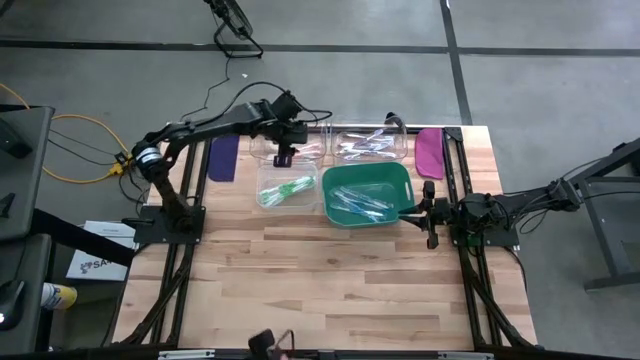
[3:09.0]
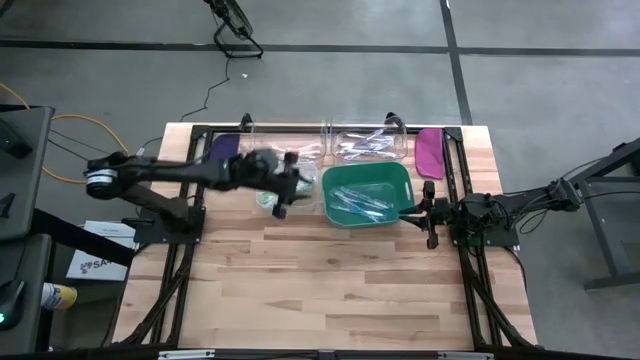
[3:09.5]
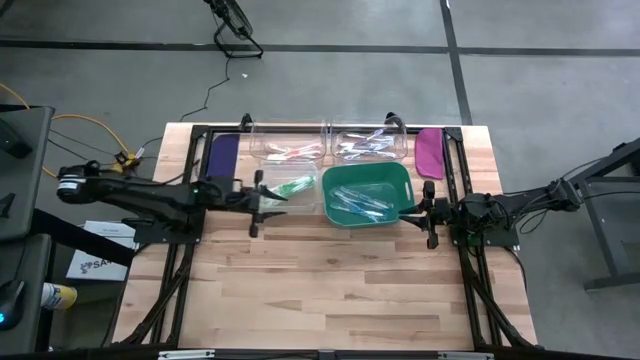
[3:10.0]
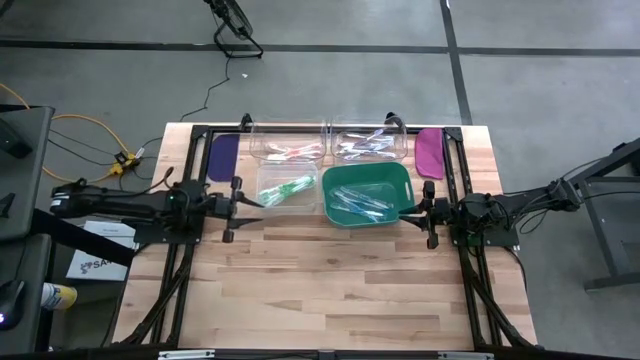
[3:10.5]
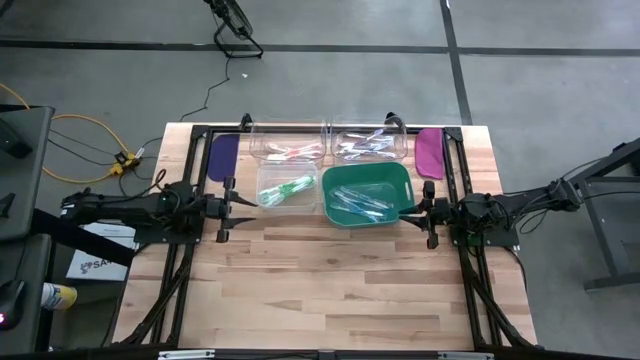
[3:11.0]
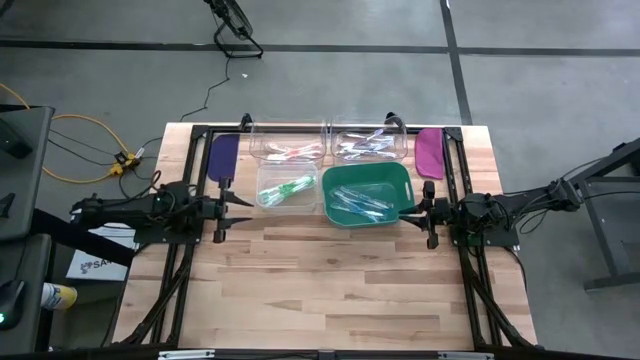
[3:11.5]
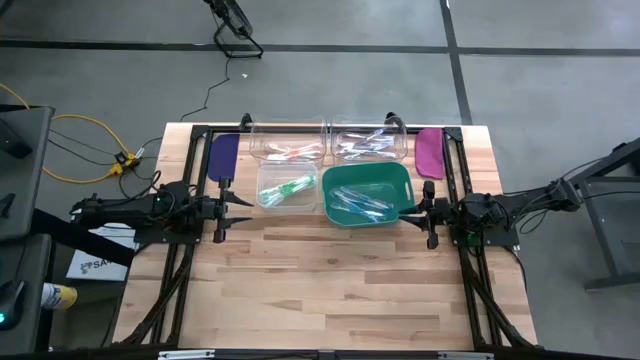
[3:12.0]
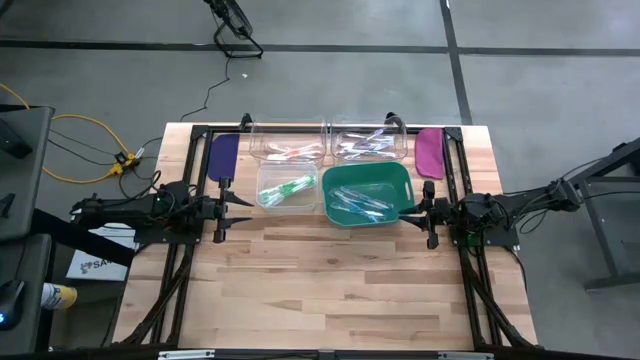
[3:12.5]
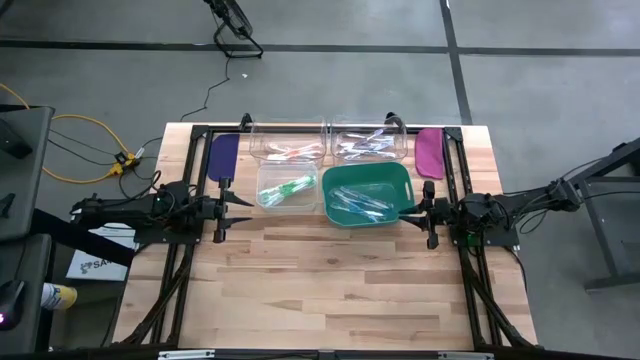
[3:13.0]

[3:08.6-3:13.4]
Task: Pick & Place Toothbrushes
Return to Home Position

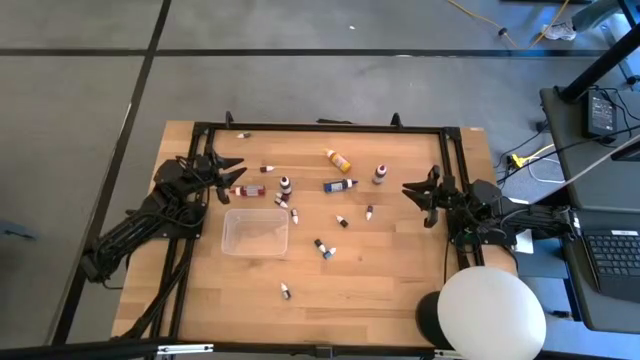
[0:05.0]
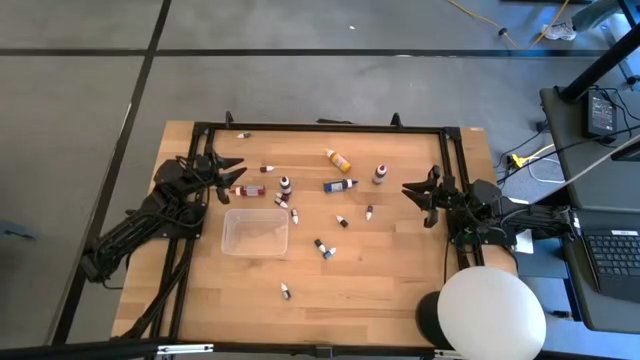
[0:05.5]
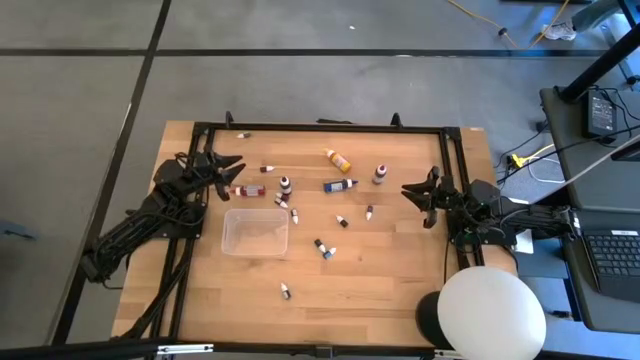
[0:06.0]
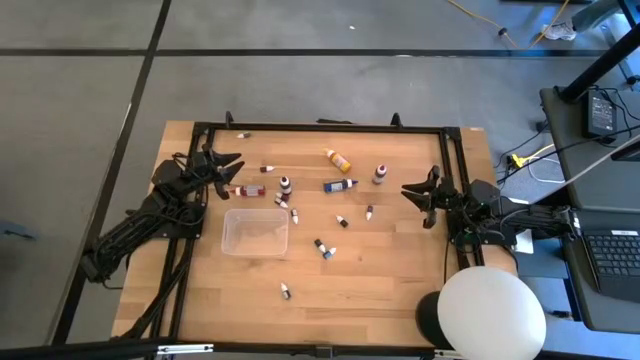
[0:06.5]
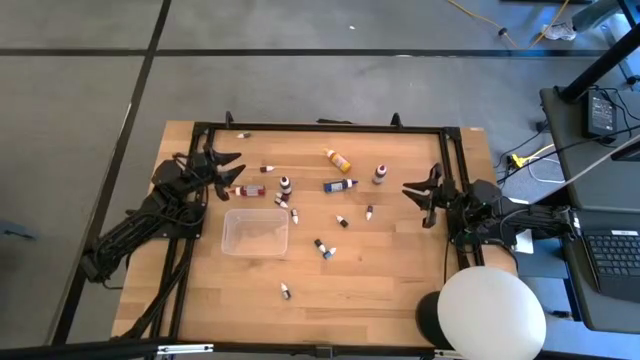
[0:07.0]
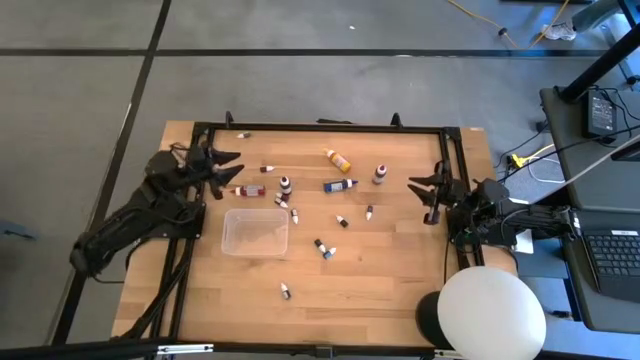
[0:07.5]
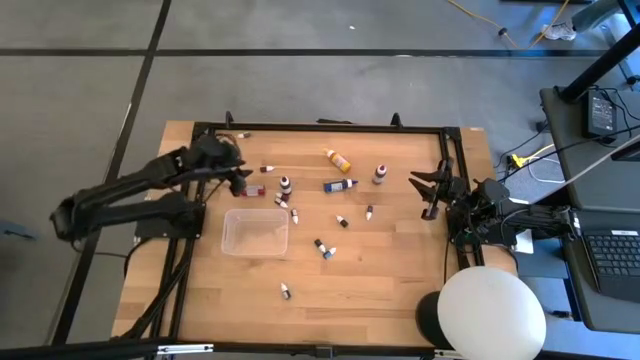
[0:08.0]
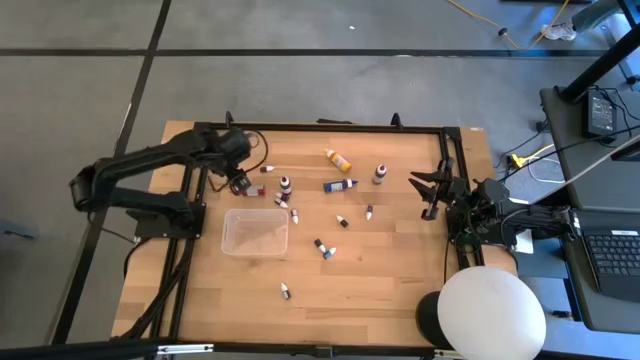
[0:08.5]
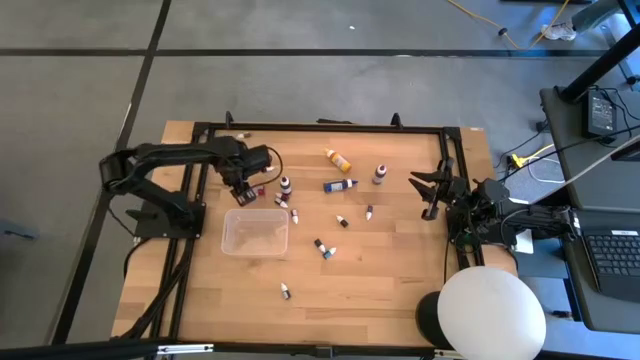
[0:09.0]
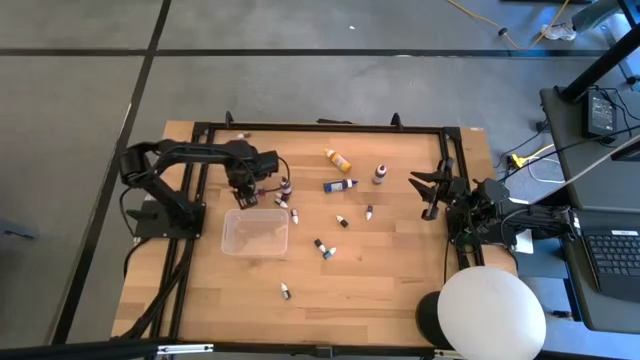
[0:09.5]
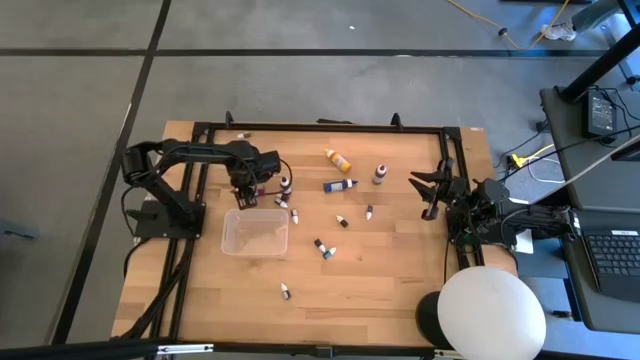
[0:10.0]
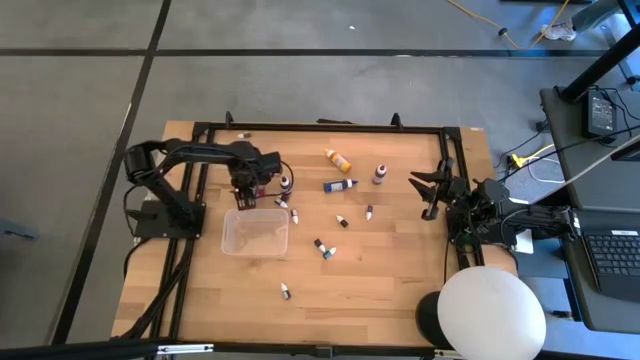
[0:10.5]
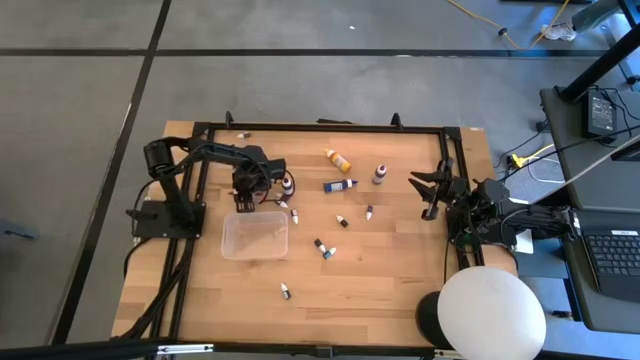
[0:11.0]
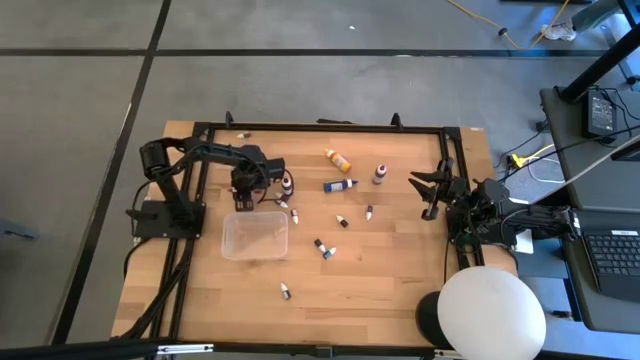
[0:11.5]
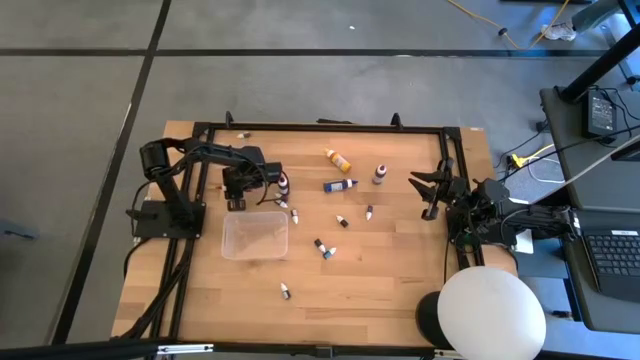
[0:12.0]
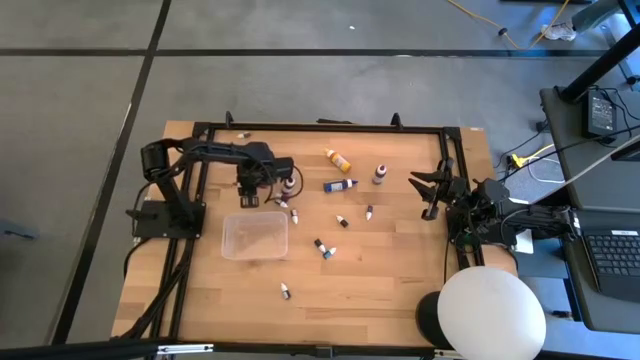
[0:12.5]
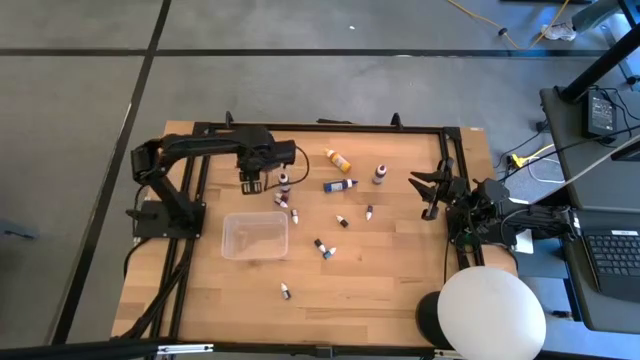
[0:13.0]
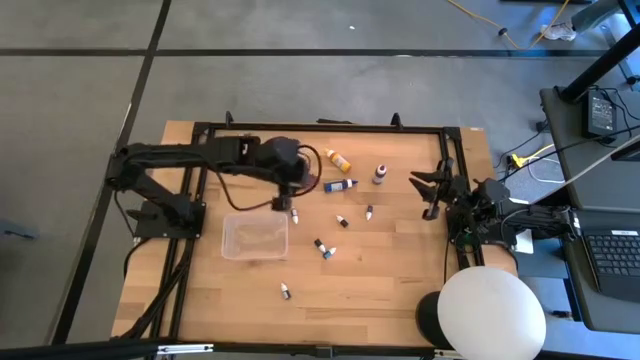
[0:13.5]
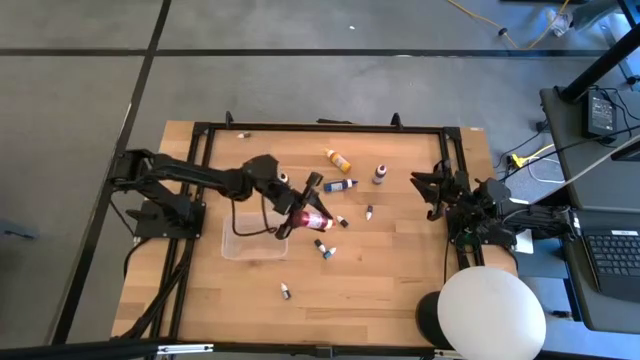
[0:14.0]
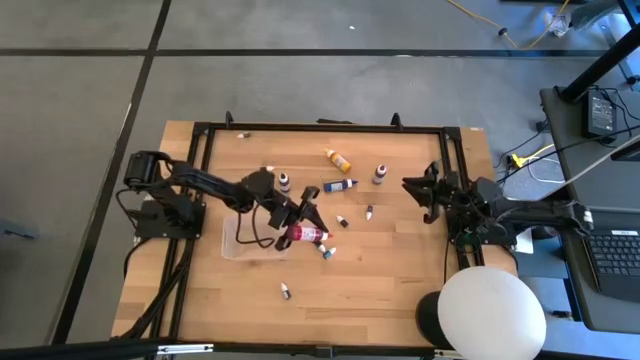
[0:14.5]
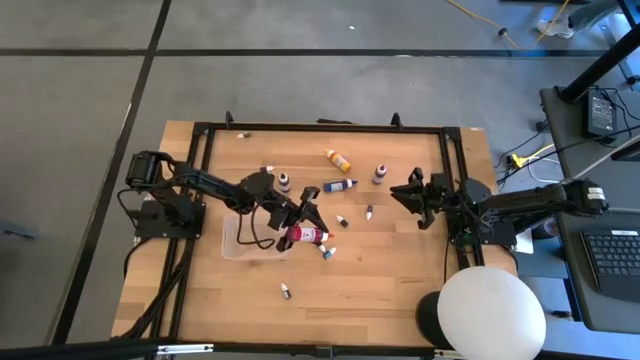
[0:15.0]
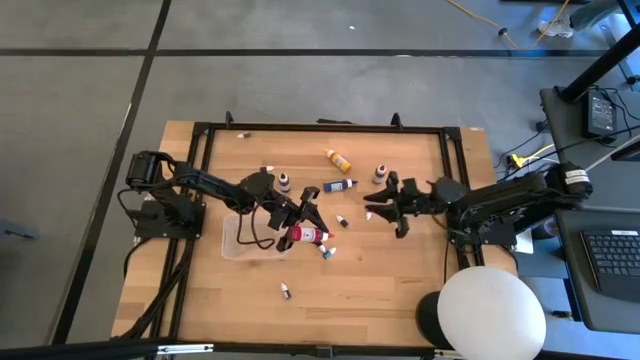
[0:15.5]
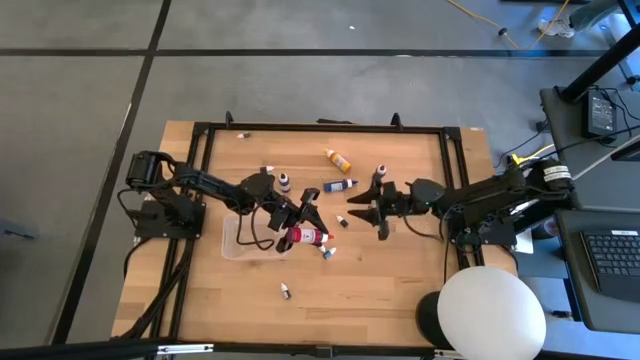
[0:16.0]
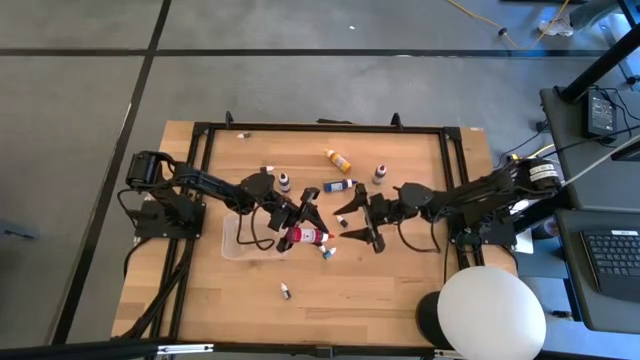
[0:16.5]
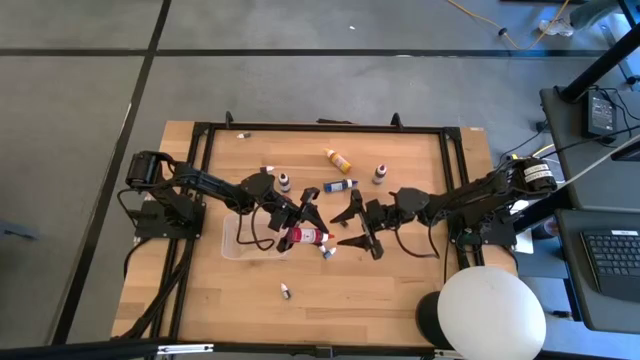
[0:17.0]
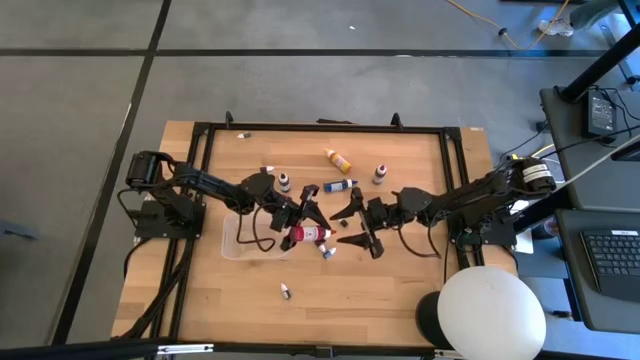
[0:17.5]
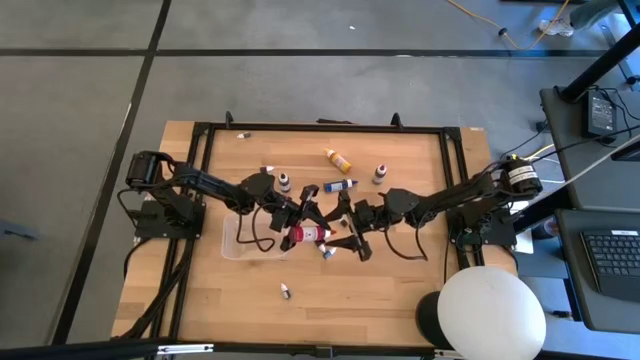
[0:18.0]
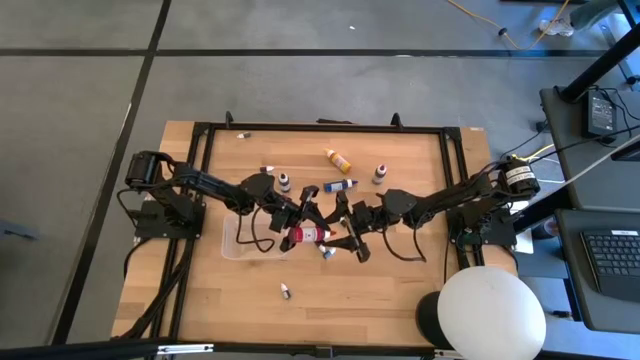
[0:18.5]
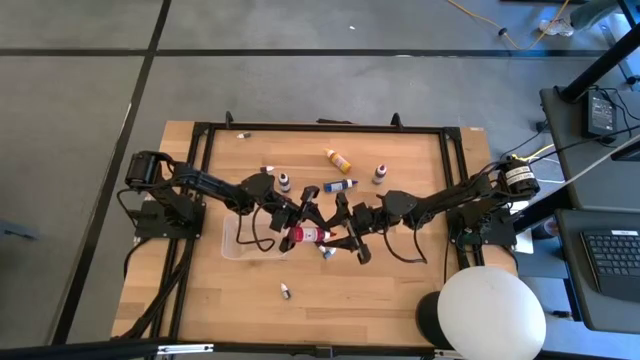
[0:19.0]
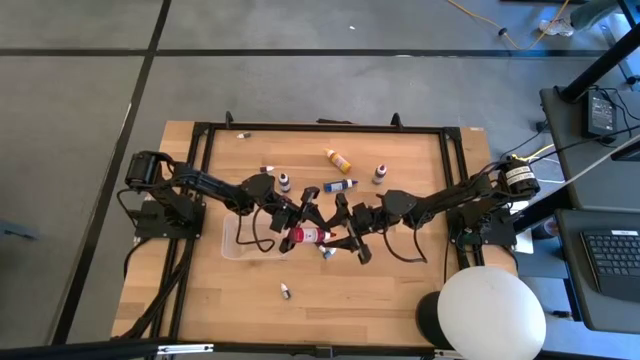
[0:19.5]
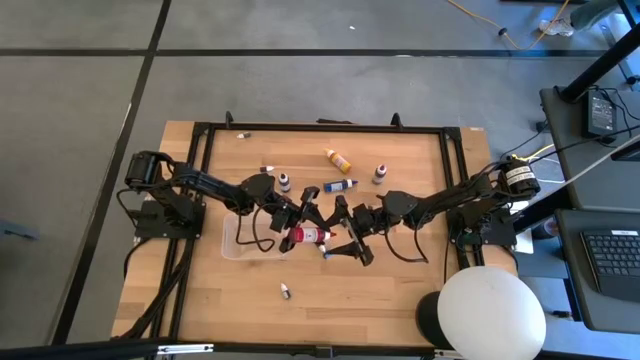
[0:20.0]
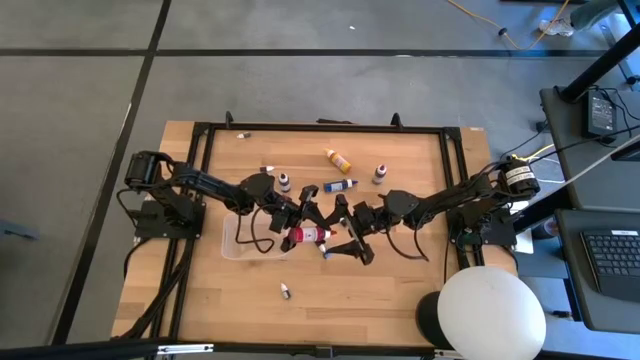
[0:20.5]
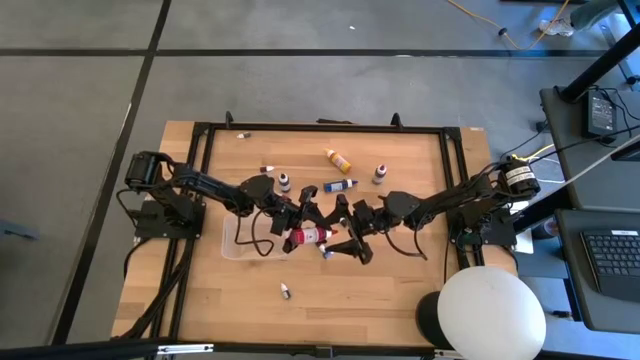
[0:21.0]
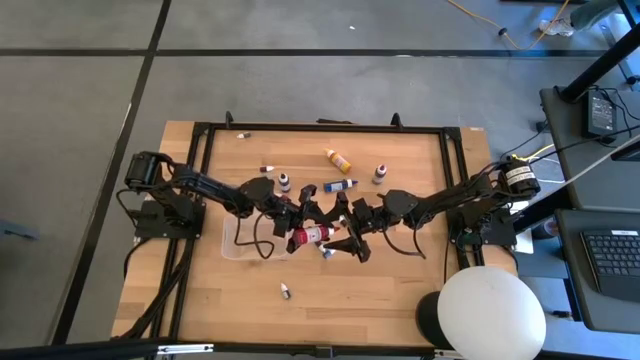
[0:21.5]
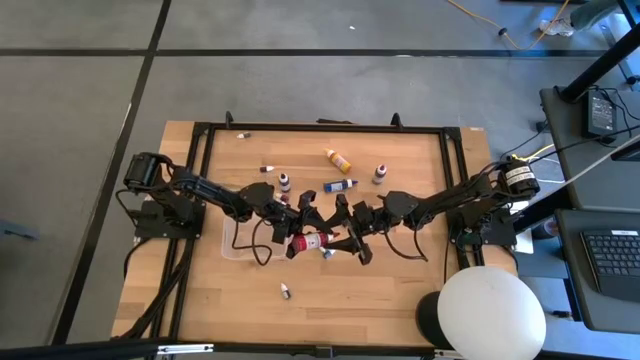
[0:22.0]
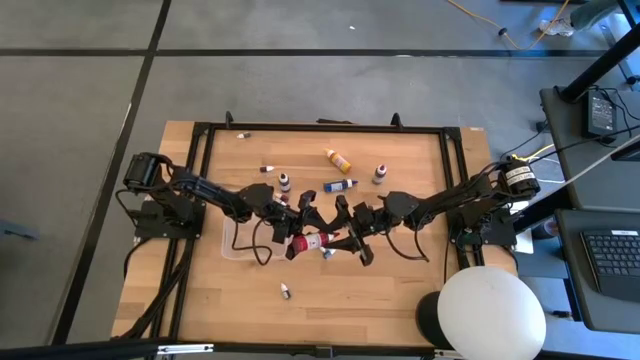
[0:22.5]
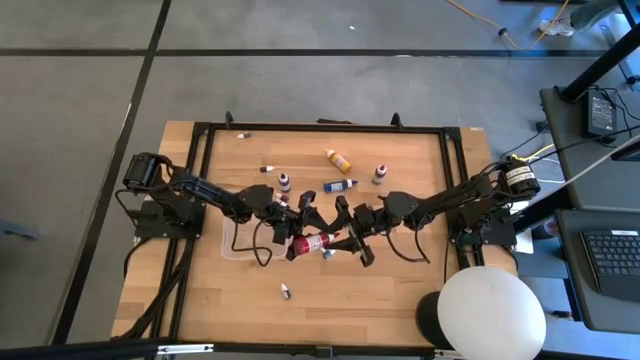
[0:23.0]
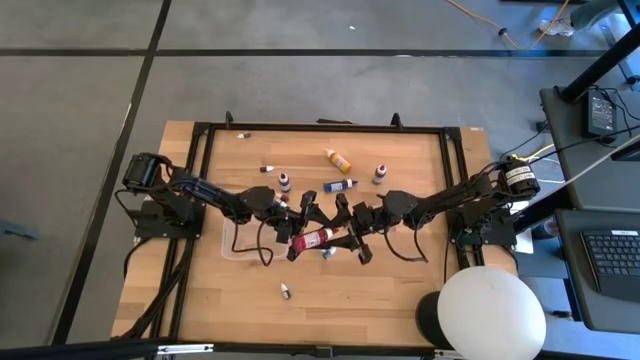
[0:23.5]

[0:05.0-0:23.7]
Task: Pick & Place food coloring
Put the large red food coloring bottle into the transparent bin
